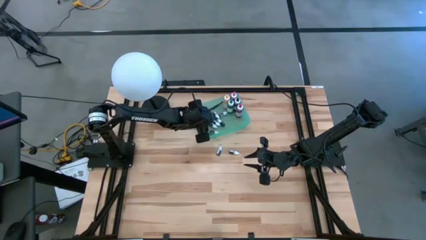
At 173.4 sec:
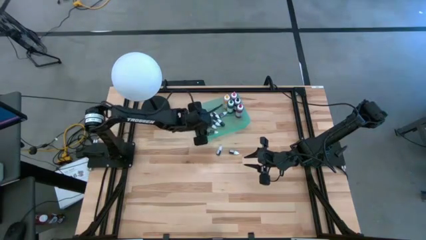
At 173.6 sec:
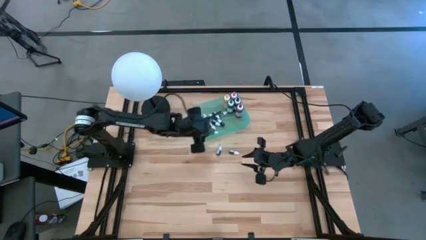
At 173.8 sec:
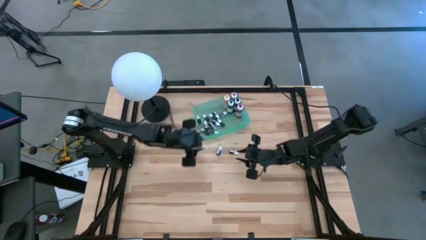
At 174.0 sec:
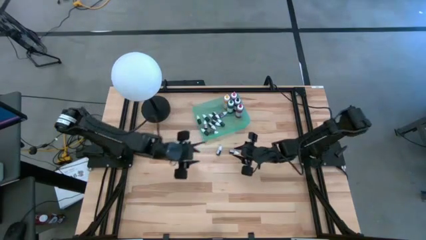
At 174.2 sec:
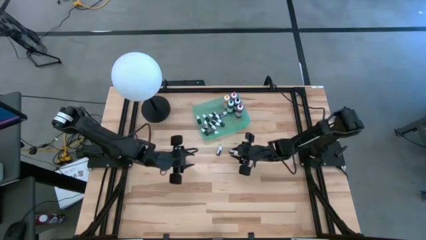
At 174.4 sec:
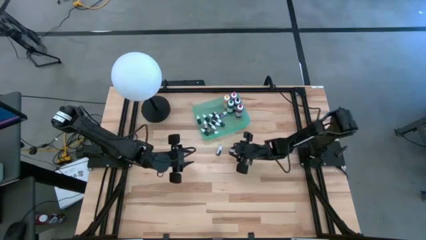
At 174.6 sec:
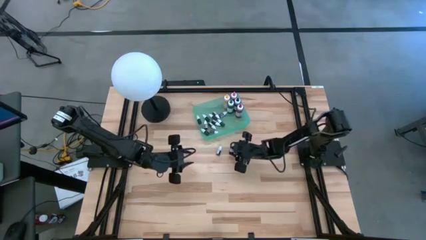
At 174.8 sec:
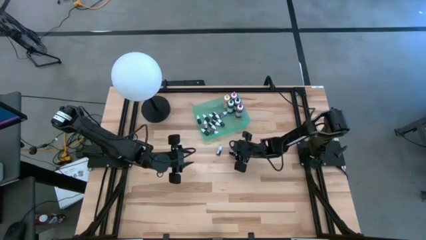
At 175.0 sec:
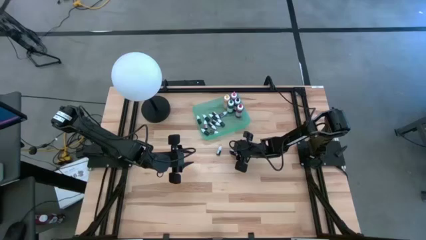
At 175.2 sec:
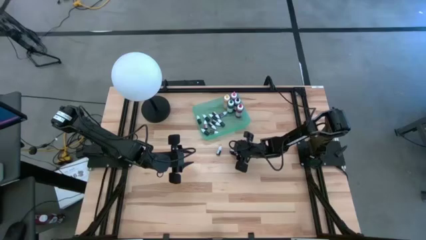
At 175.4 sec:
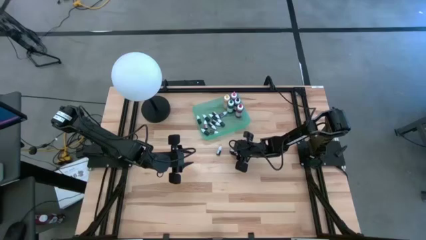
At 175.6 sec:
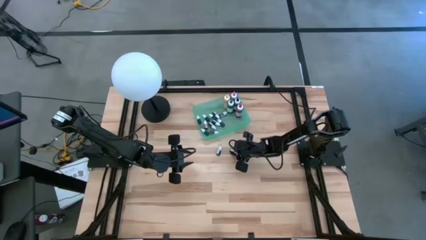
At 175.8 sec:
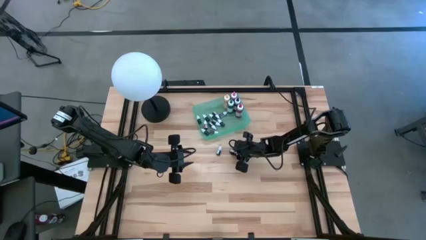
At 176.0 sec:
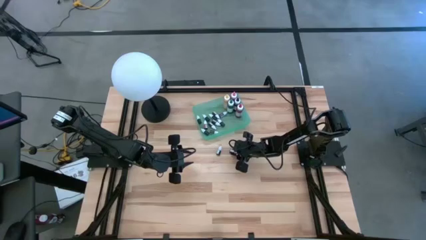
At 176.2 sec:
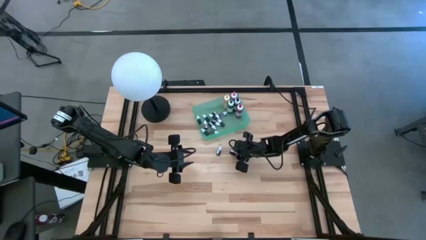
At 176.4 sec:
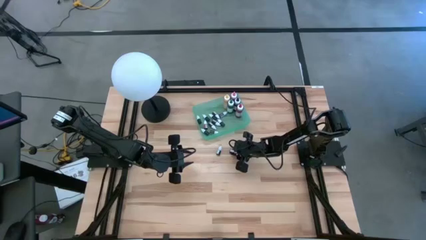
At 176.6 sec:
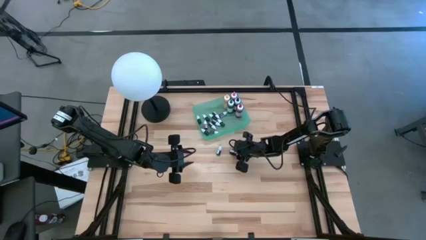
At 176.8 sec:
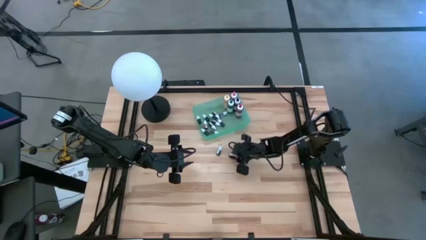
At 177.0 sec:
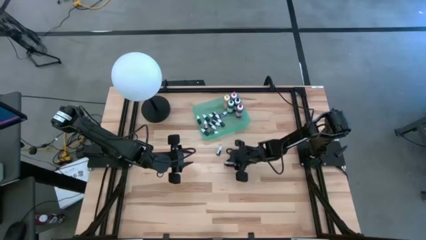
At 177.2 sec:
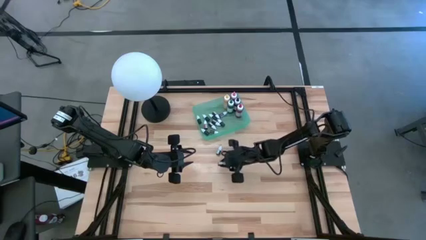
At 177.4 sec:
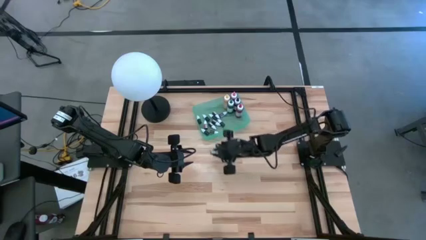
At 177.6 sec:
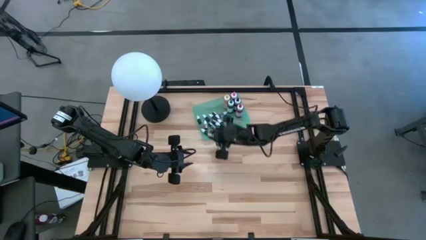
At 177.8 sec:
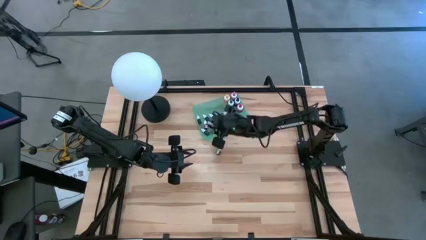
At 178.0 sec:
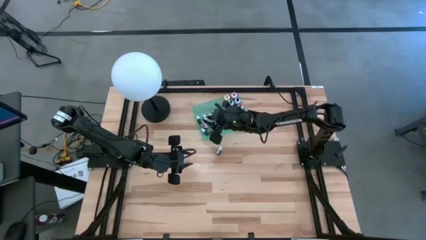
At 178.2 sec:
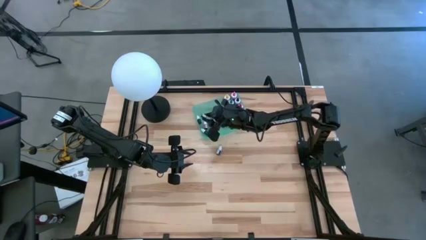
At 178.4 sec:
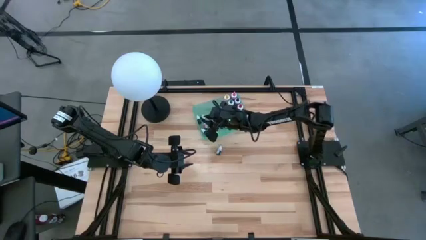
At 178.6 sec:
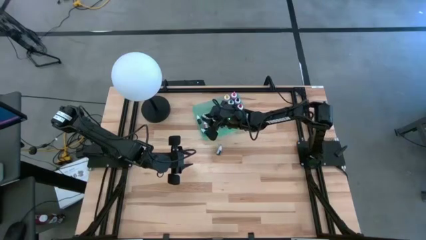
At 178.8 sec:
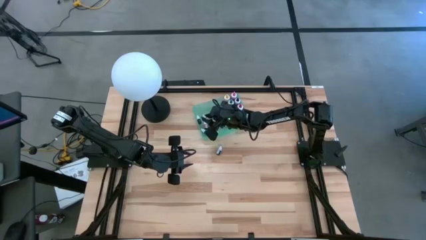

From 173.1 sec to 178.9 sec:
Task: Pick & Place food coloring
Put the green food coloring bottle into the green bin

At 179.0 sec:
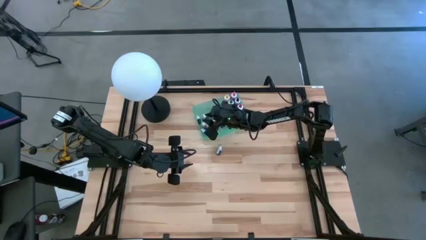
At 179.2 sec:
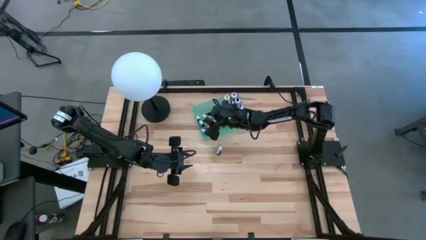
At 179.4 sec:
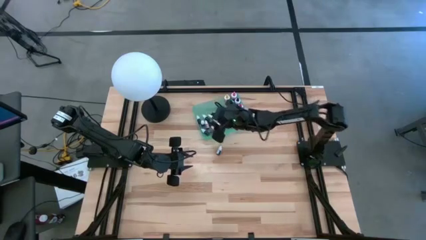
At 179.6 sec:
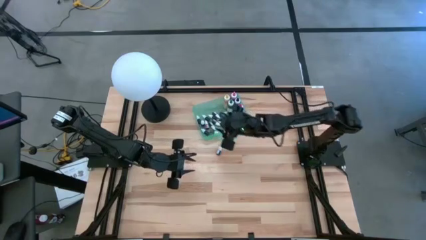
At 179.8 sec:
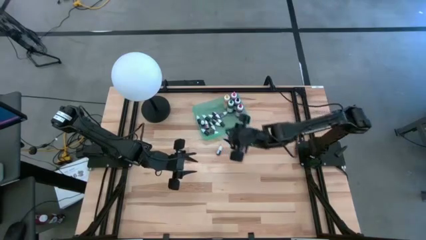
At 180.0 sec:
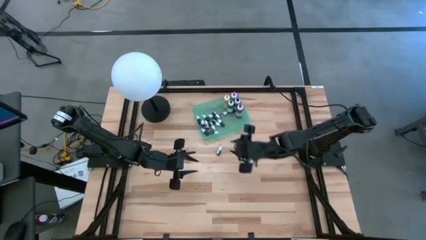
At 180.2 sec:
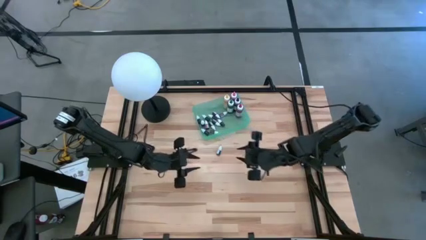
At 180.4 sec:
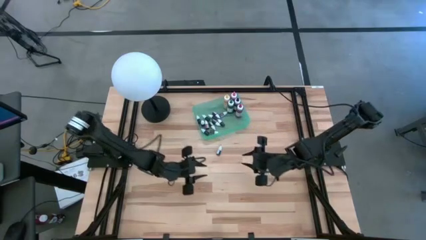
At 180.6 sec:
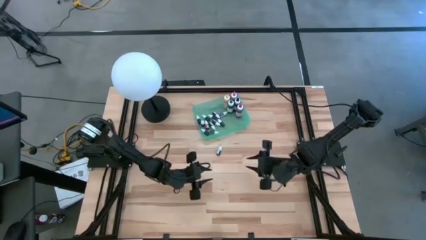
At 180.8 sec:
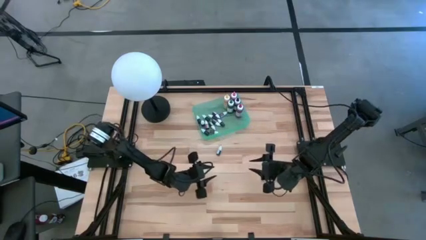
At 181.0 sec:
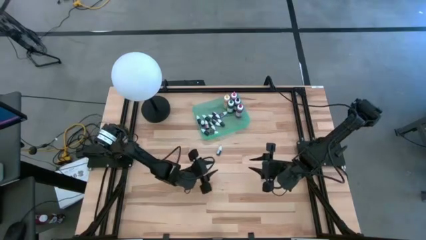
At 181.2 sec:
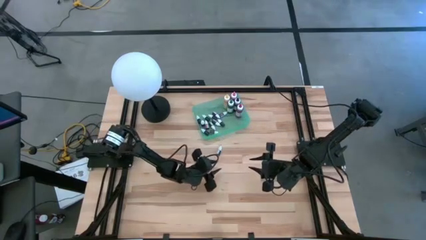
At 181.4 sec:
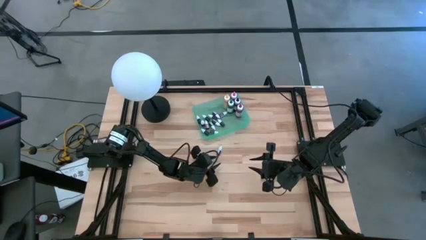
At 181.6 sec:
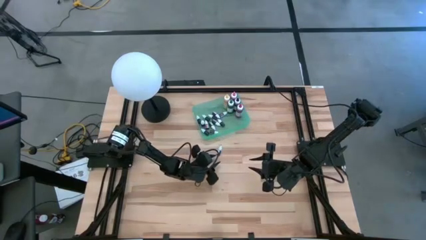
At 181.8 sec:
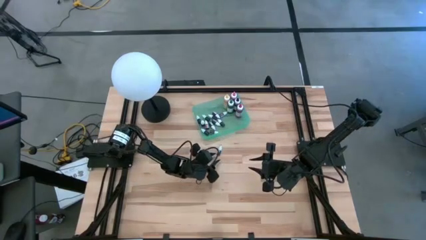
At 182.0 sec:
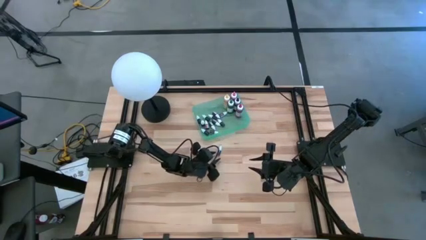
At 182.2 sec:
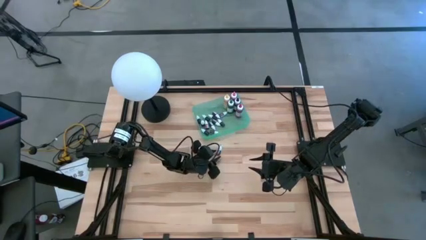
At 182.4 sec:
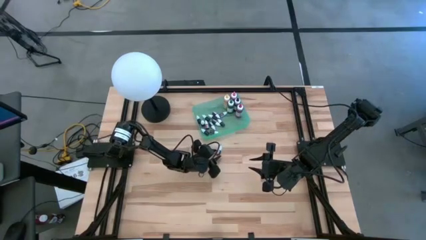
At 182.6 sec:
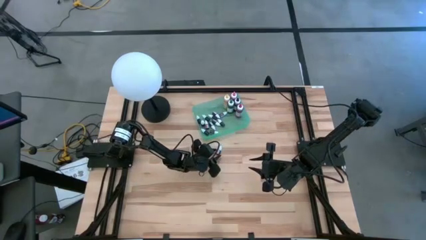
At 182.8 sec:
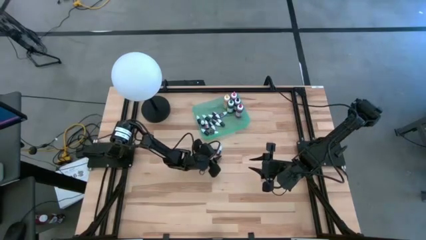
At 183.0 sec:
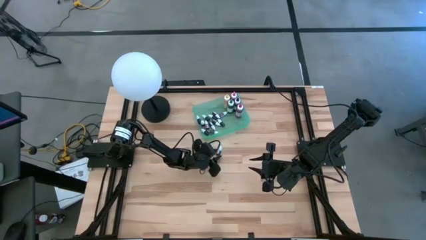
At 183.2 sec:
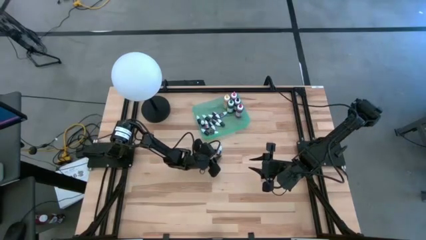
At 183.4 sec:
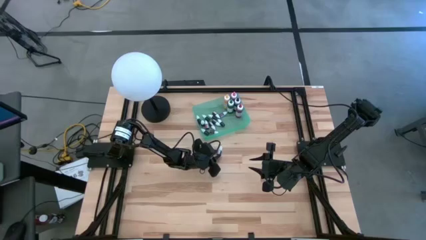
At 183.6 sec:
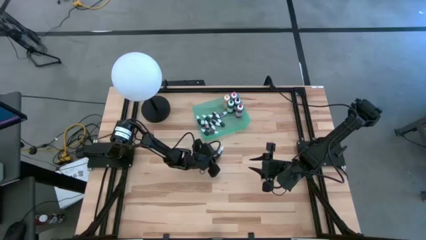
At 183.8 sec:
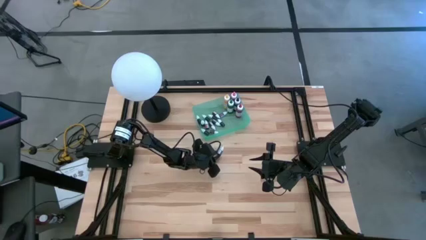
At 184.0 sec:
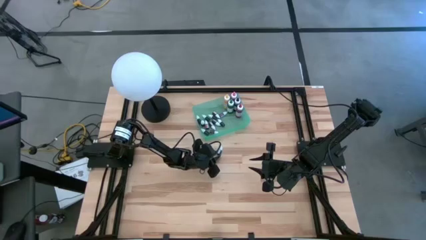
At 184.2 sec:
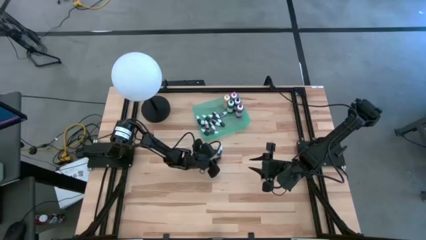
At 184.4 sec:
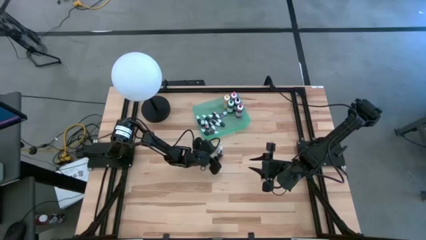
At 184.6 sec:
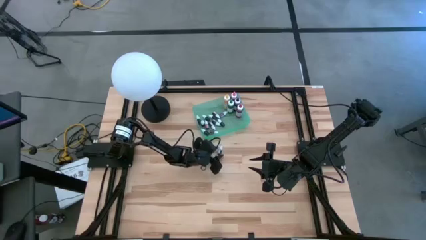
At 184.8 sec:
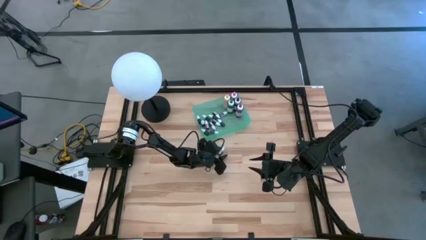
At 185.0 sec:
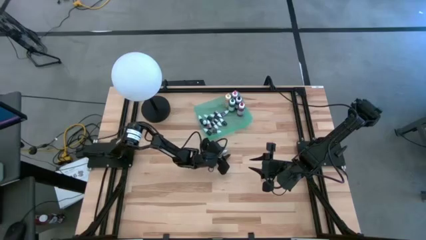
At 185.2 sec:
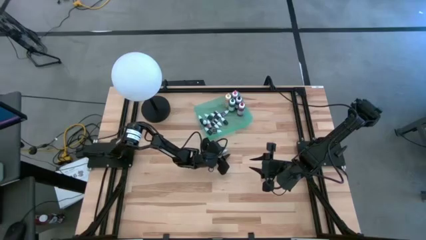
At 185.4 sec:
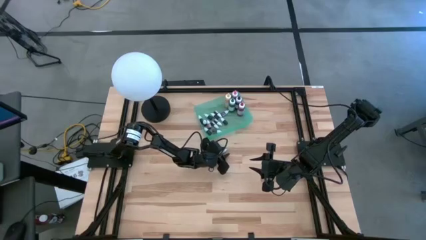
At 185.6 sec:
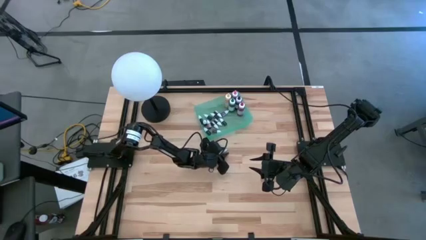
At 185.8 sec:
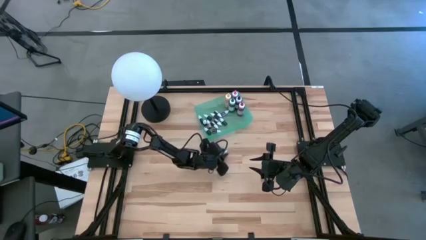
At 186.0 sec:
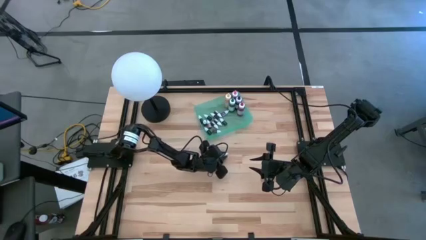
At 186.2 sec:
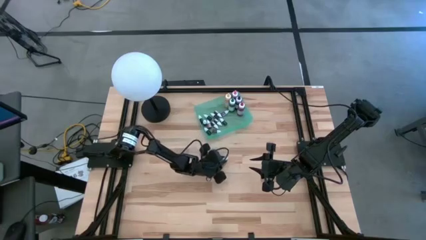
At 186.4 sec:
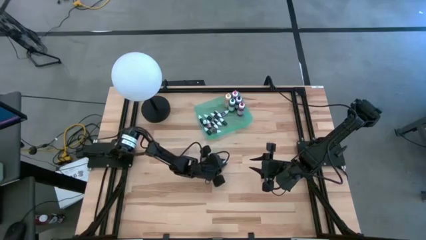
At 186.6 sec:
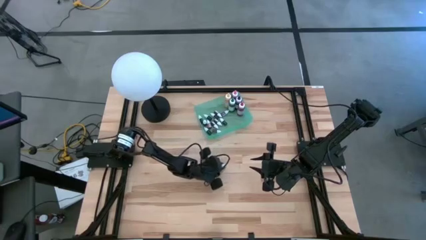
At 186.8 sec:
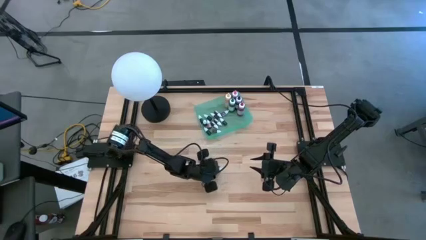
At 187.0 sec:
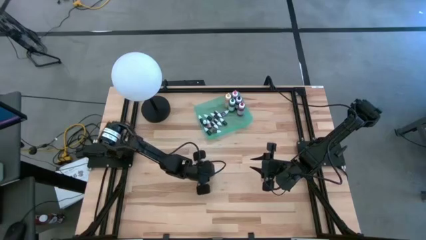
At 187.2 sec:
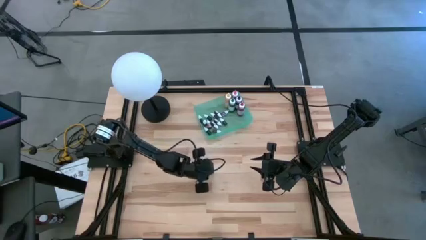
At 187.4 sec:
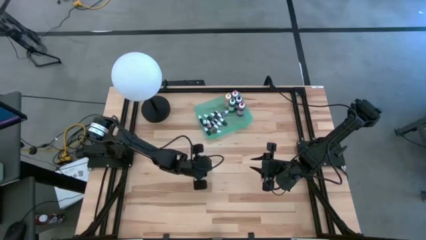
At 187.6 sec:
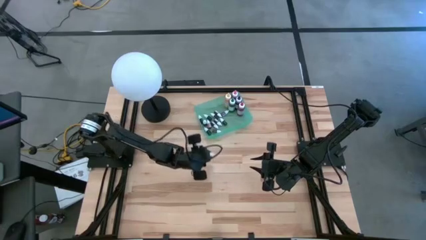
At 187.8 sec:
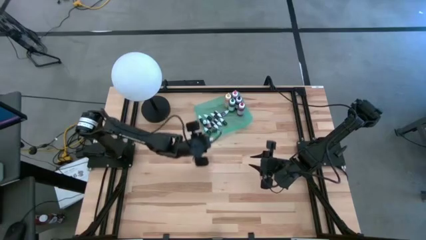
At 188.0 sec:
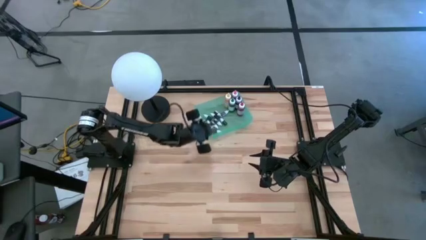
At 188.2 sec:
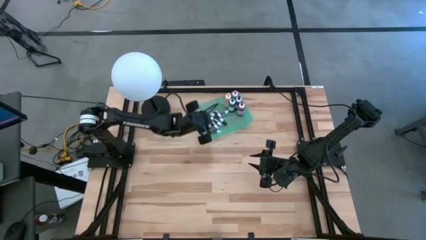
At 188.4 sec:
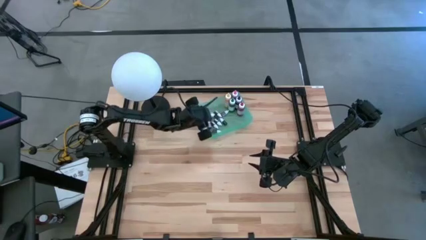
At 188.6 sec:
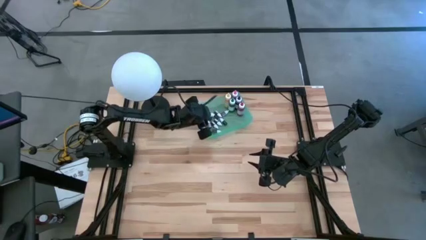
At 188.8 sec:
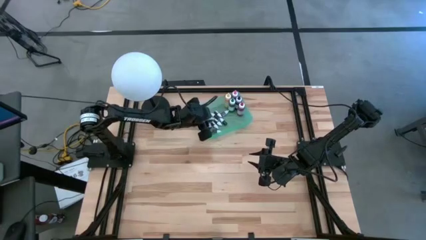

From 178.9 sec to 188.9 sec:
Put the blue food coloring bottle into the green bin
